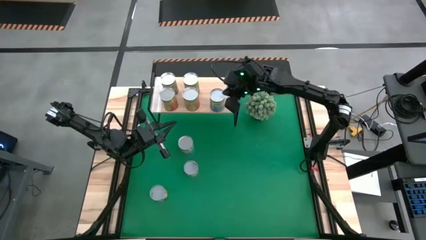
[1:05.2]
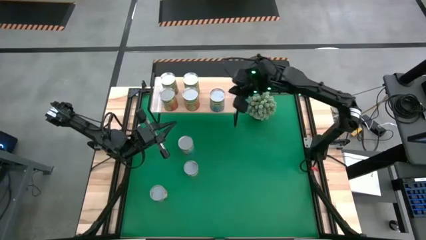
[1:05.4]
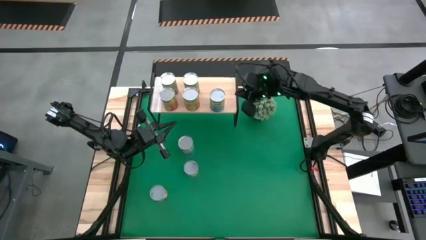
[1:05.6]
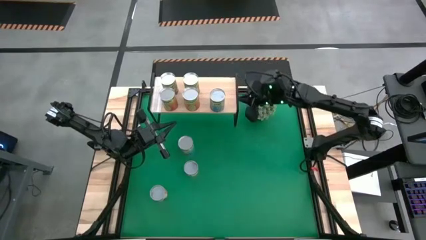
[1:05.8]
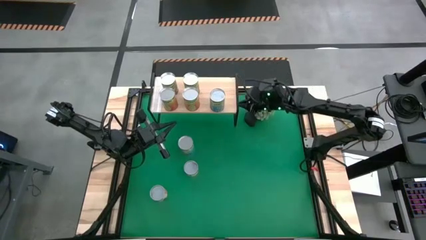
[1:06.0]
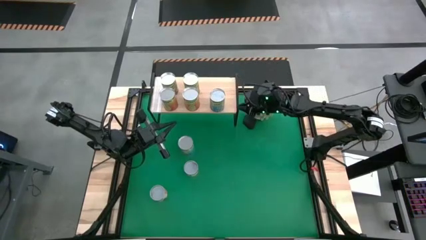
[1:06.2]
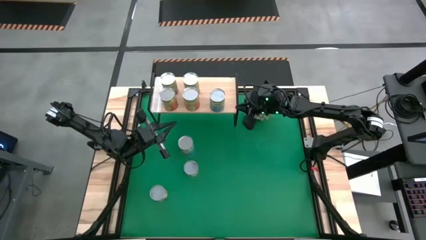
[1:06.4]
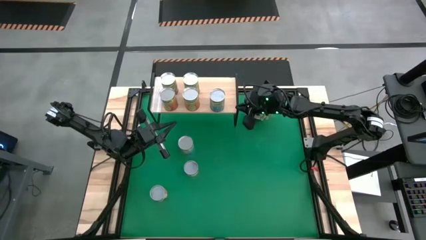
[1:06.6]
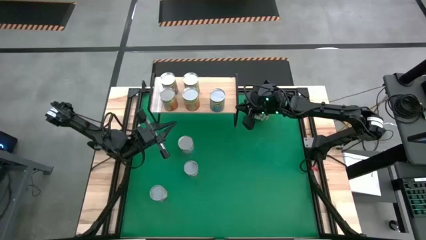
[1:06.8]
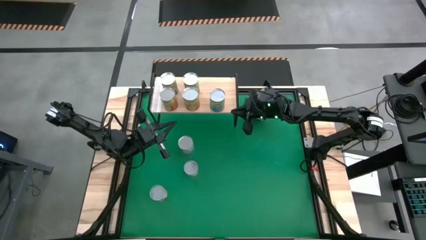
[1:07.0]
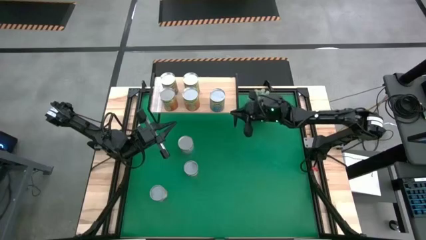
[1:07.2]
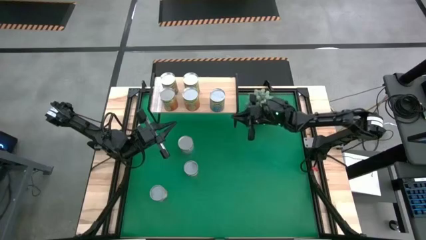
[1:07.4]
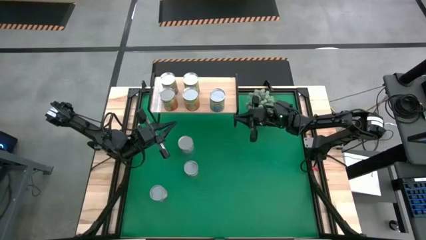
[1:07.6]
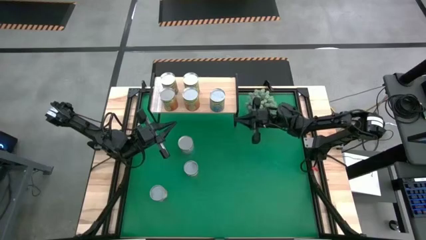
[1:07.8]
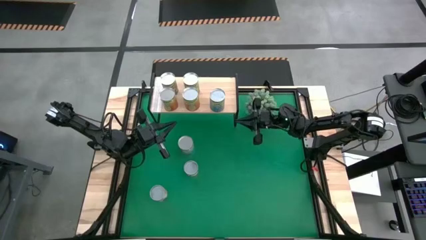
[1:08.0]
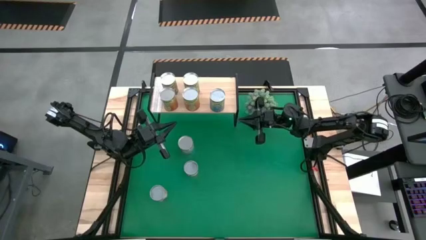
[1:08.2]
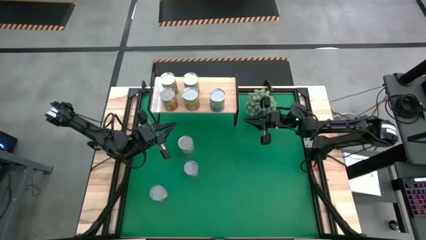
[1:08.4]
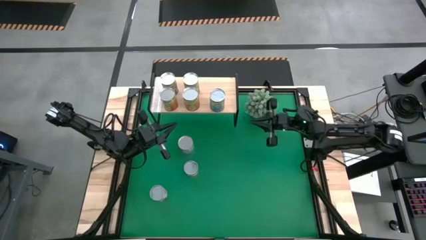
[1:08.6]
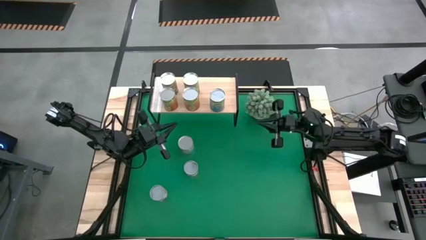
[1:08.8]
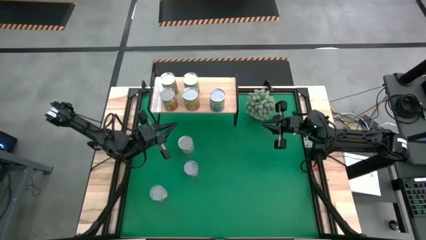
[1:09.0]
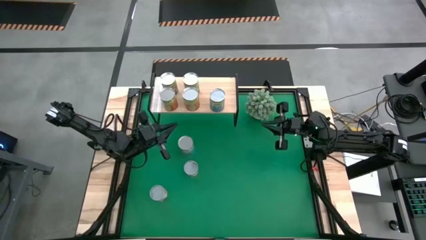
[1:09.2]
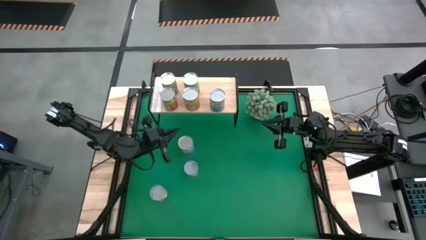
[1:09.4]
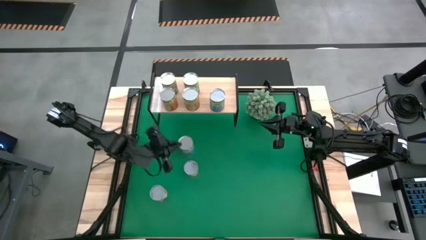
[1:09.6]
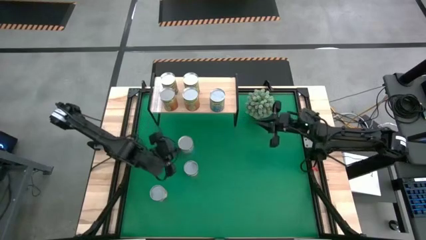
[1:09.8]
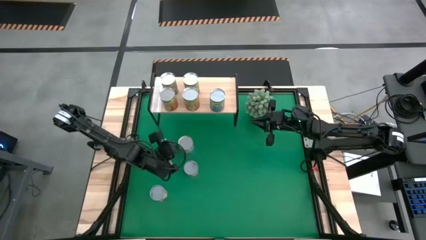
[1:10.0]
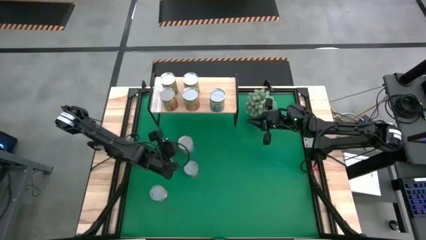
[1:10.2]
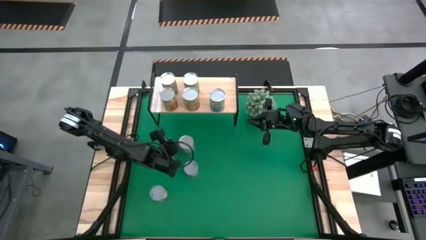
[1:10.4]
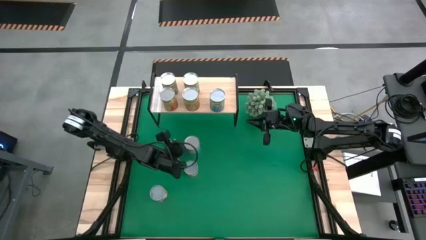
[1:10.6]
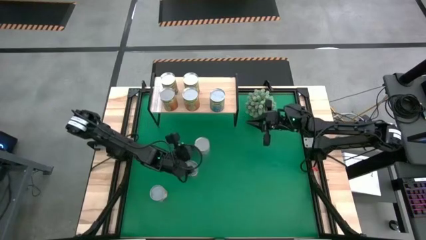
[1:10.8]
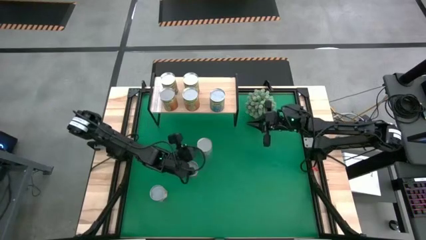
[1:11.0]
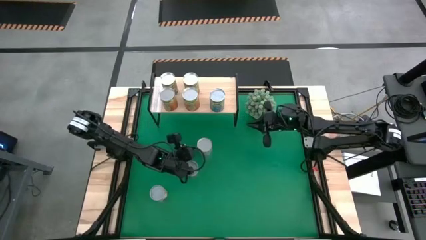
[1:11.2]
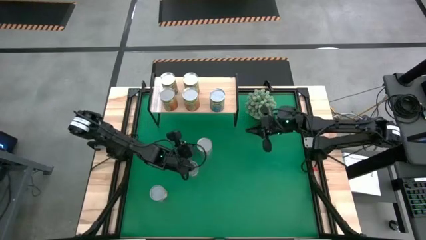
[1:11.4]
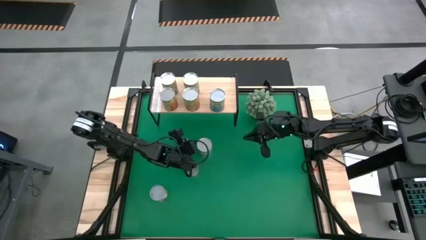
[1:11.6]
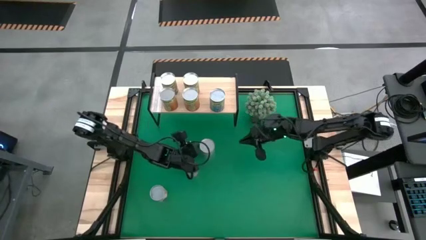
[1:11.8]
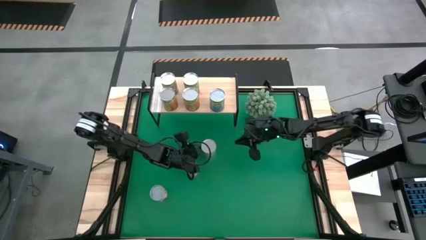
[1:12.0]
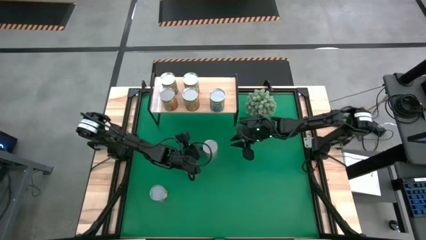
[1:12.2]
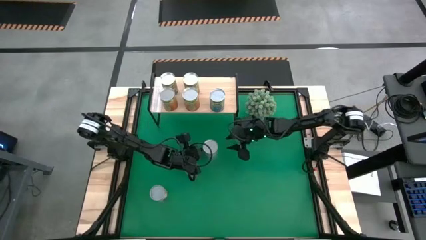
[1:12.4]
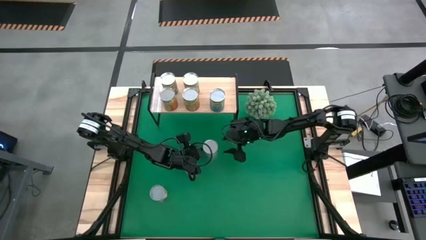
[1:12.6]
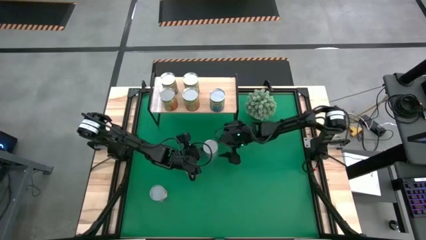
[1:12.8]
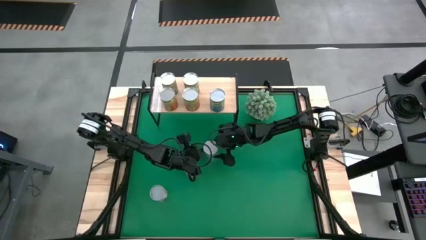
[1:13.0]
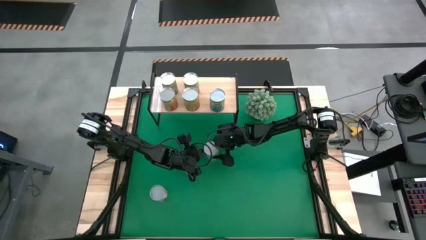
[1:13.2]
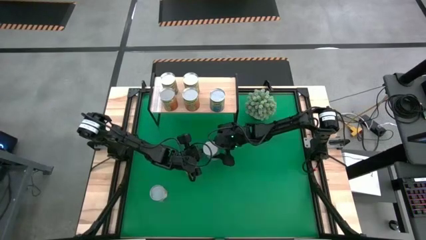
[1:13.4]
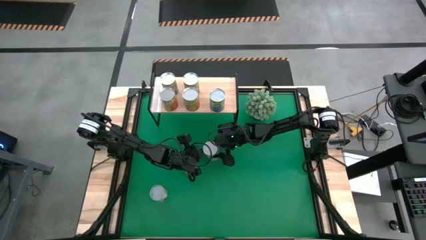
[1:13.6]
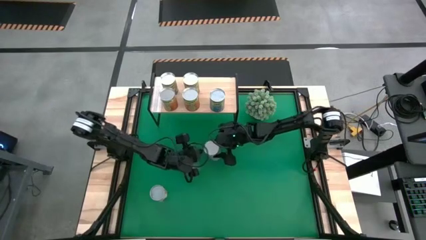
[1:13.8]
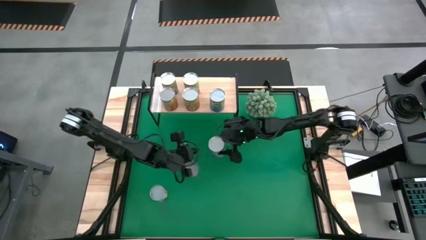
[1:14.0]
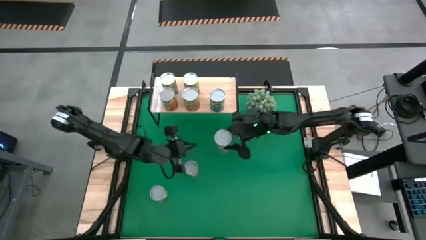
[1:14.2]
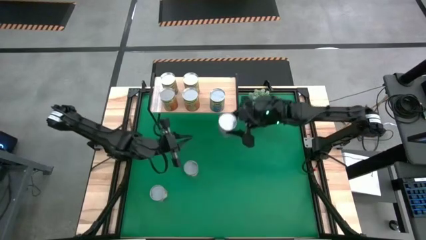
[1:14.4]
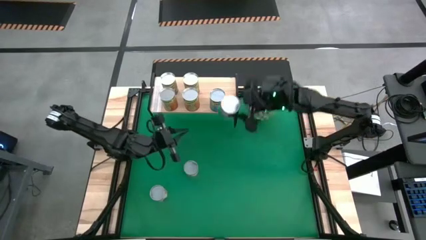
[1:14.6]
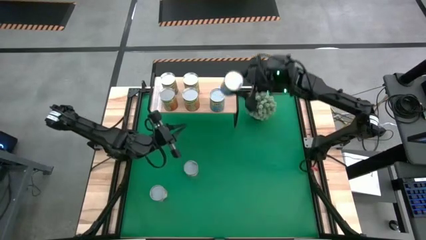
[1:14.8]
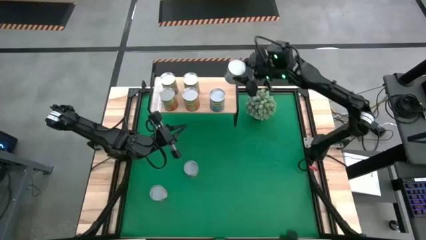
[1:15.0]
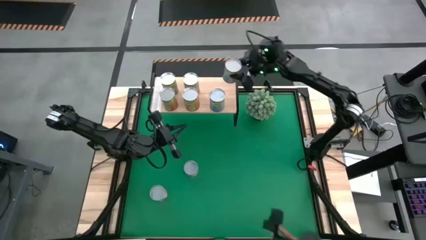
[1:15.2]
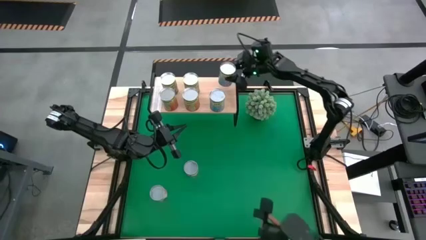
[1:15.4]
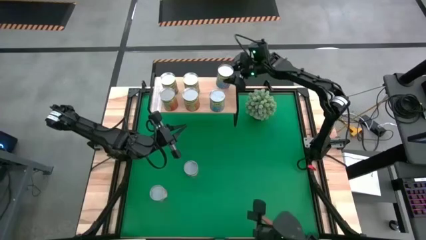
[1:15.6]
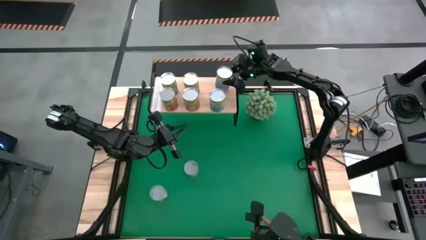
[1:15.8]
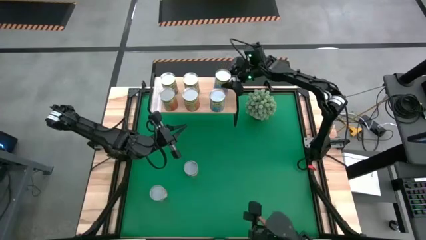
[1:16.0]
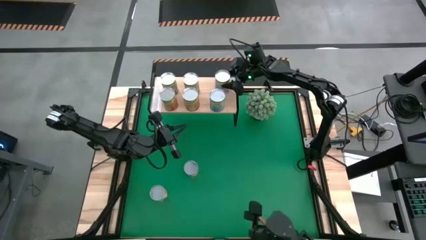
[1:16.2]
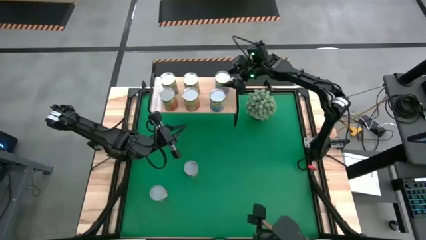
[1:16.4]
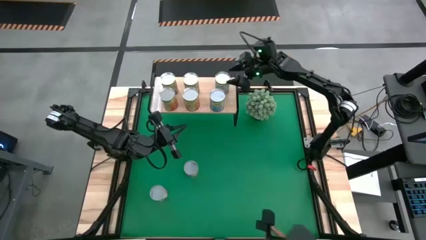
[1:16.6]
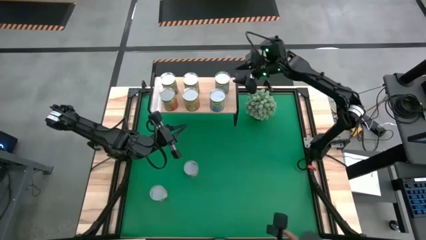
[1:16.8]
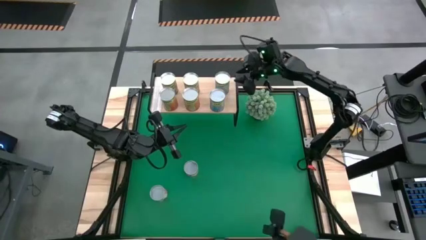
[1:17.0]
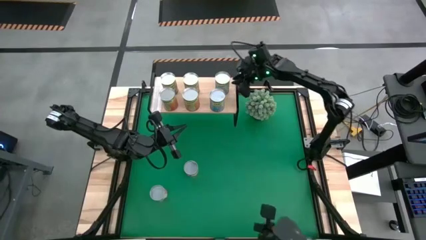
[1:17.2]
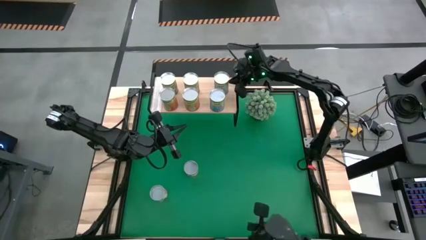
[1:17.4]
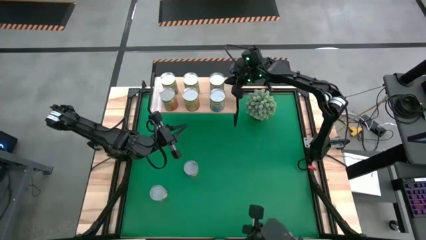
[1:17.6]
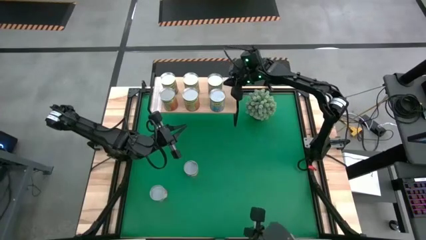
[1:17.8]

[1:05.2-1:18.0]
Task: Pick and place cans onto a shelf
Put the canned cherries on the shelf

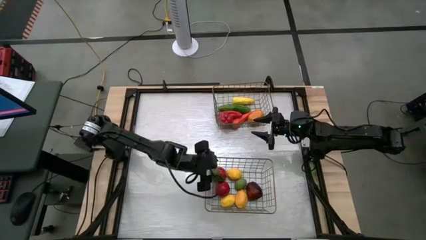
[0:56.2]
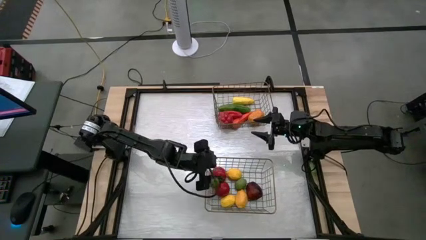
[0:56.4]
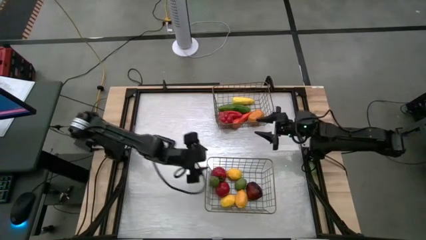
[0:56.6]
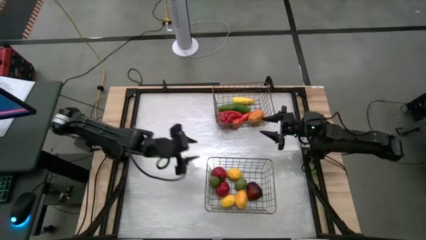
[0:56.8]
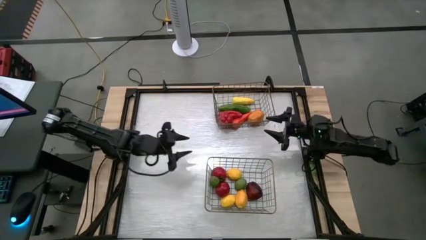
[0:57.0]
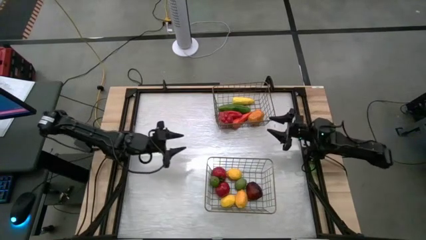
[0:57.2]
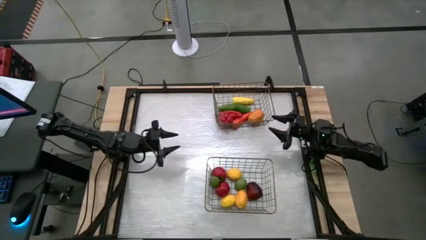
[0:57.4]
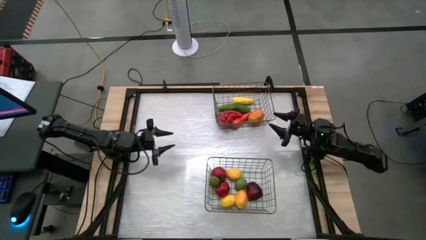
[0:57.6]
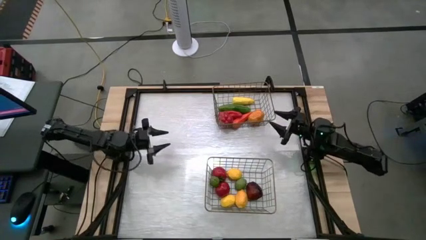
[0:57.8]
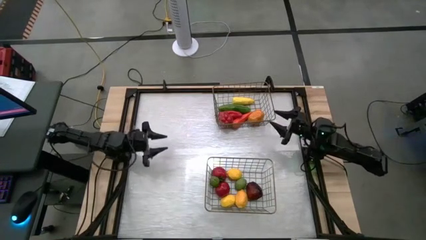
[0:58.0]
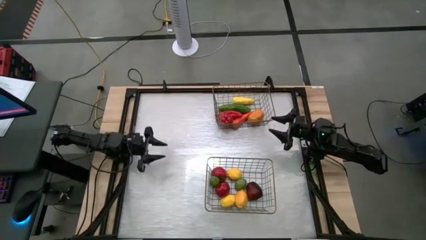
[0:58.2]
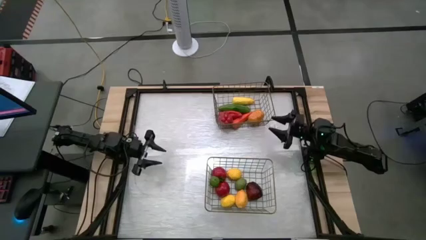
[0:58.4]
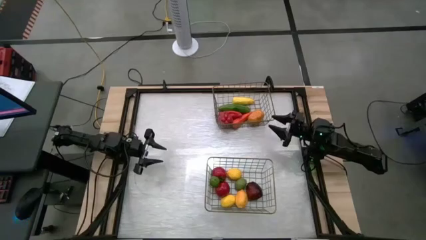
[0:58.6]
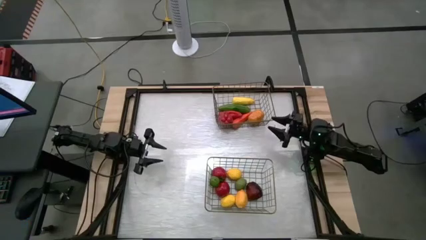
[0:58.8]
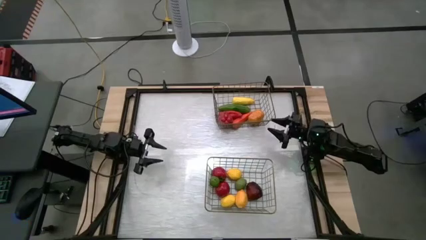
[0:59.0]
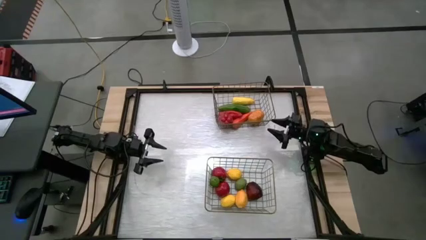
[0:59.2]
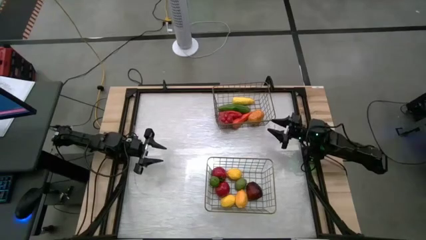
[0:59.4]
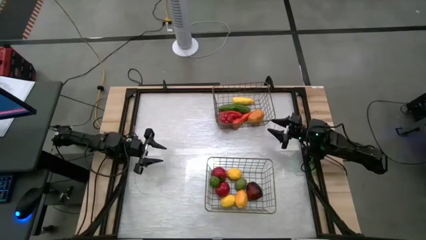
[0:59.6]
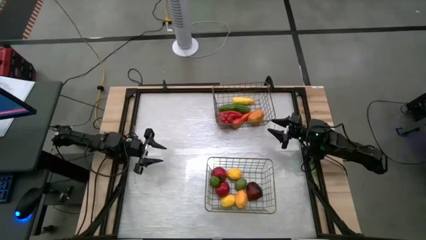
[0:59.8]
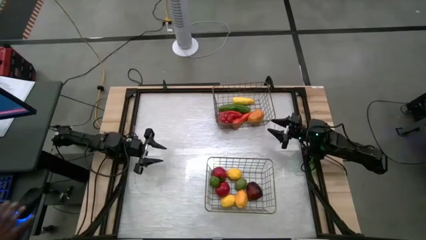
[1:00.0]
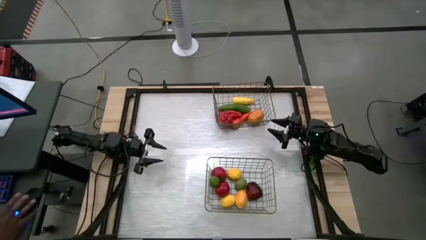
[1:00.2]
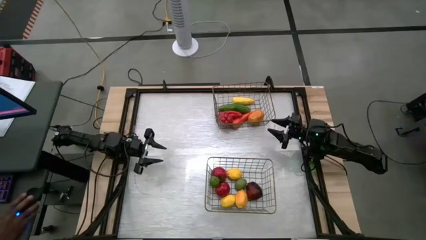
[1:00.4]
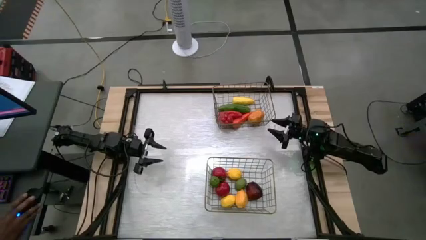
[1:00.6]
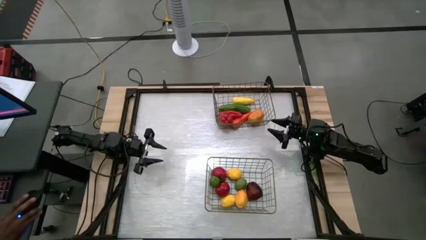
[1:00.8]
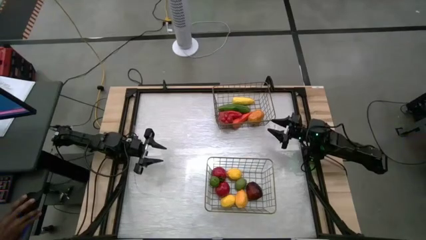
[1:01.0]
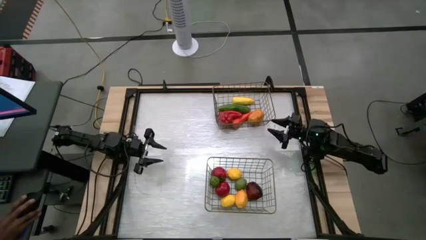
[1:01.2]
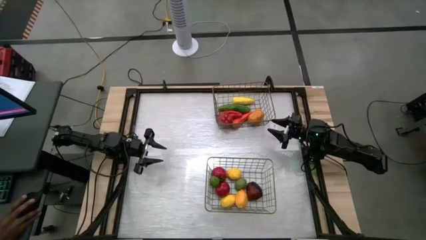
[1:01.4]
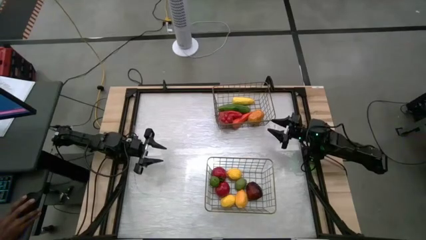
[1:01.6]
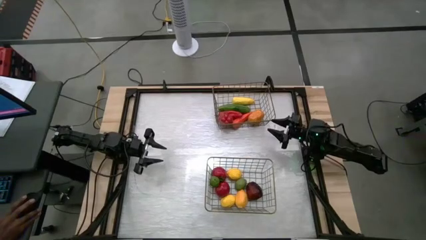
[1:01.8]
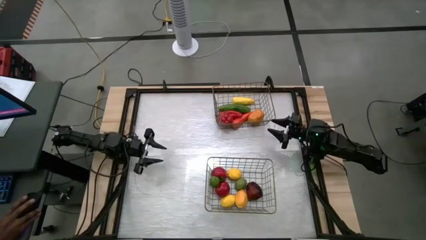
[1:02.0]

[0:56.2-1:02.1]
Task: Sort produce into baskets
Return to Home Position
